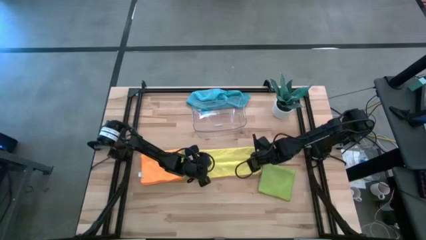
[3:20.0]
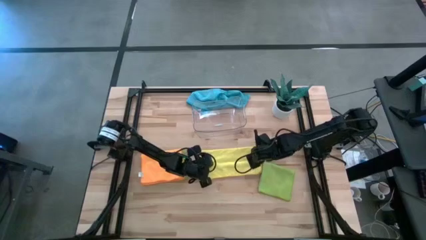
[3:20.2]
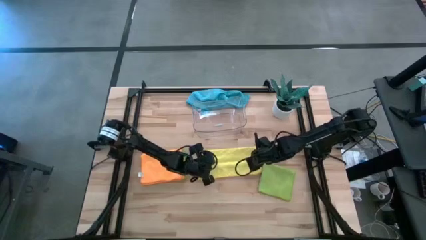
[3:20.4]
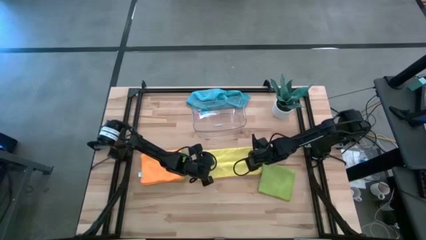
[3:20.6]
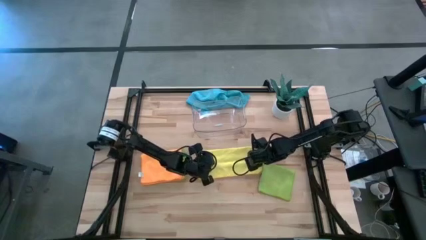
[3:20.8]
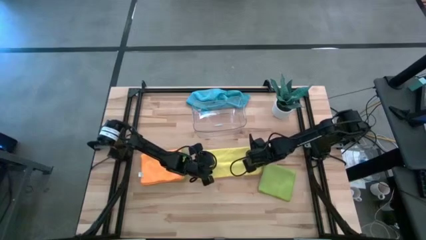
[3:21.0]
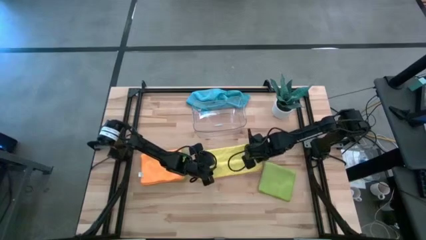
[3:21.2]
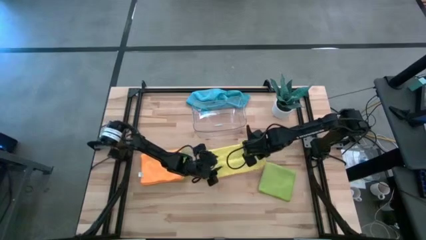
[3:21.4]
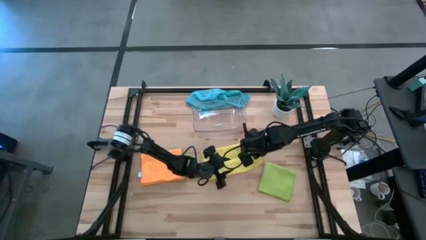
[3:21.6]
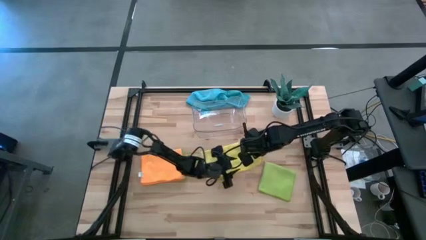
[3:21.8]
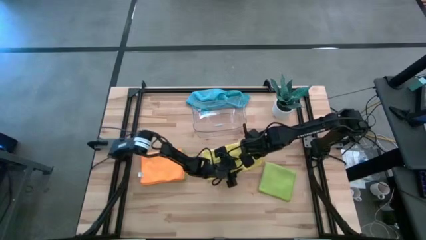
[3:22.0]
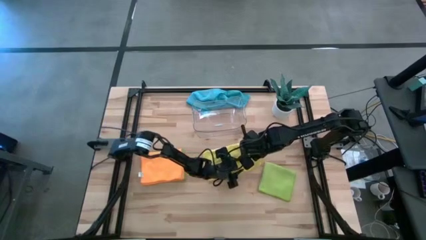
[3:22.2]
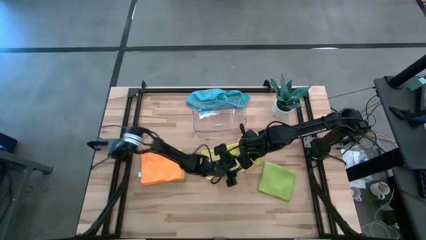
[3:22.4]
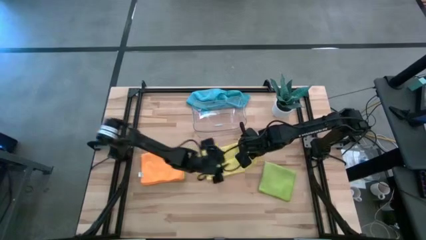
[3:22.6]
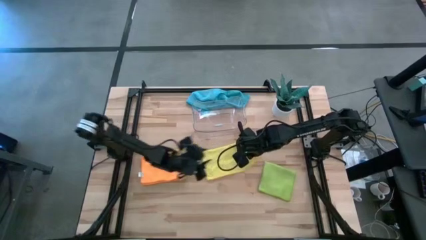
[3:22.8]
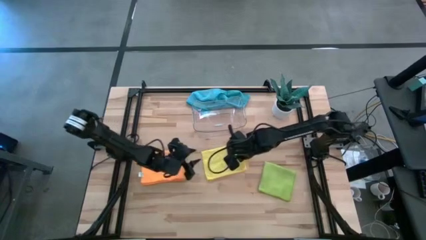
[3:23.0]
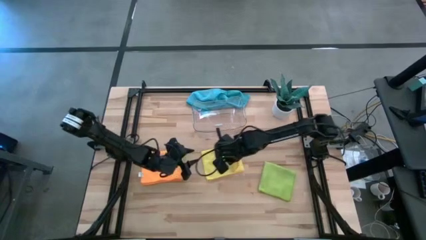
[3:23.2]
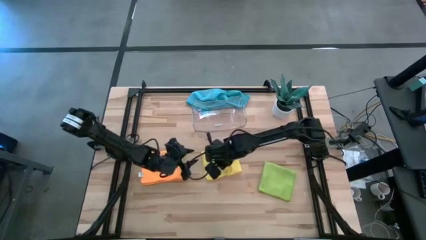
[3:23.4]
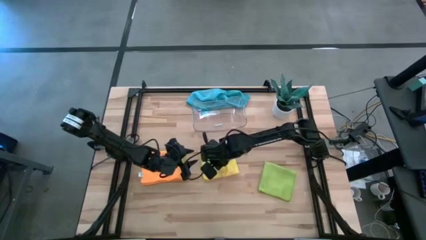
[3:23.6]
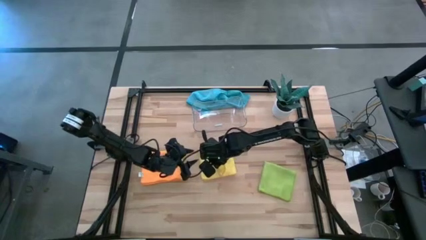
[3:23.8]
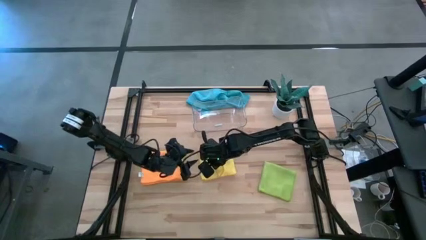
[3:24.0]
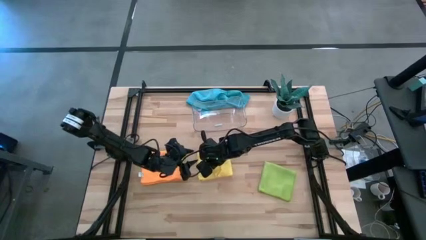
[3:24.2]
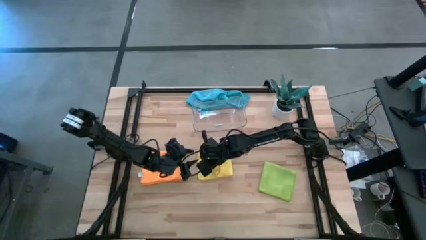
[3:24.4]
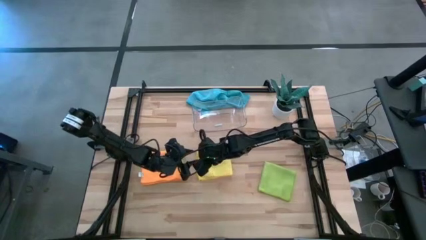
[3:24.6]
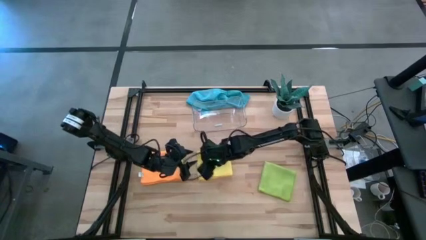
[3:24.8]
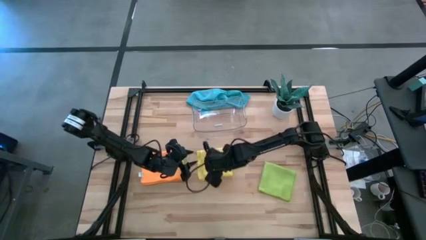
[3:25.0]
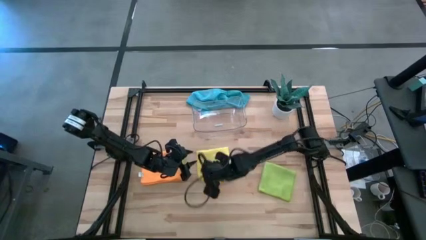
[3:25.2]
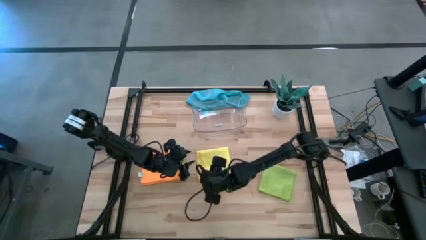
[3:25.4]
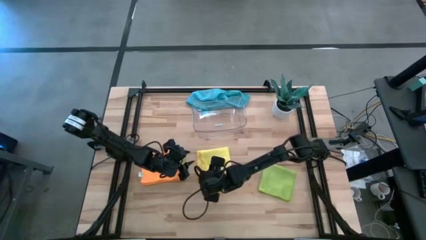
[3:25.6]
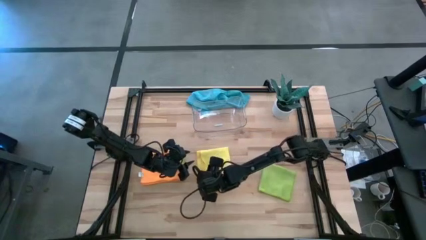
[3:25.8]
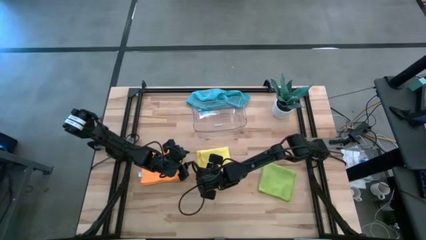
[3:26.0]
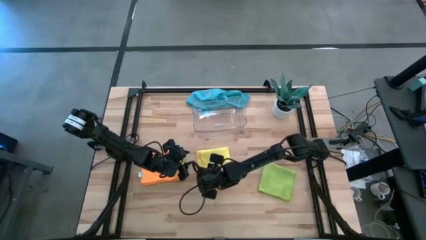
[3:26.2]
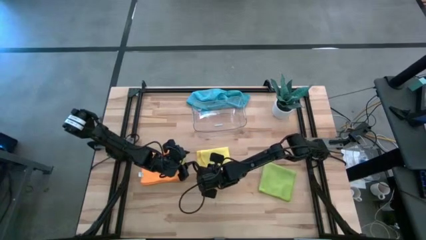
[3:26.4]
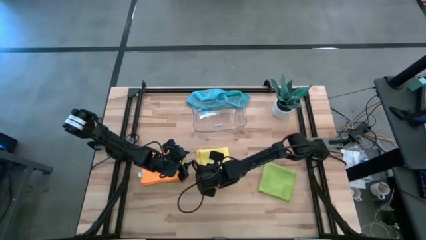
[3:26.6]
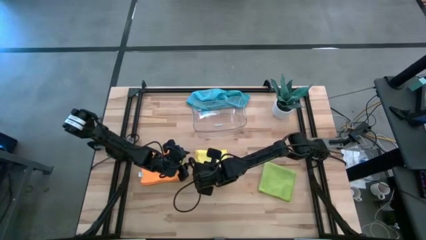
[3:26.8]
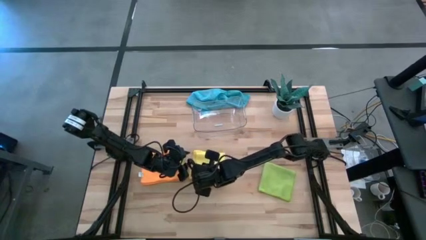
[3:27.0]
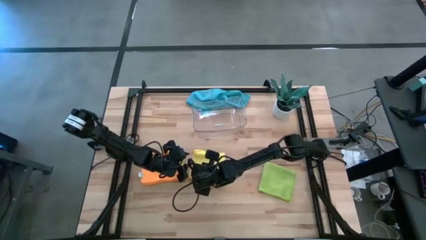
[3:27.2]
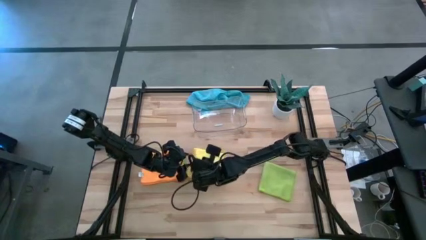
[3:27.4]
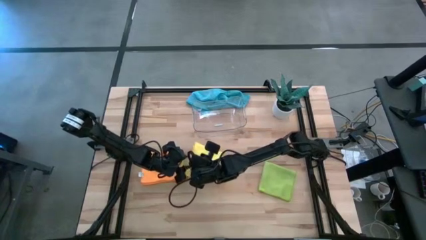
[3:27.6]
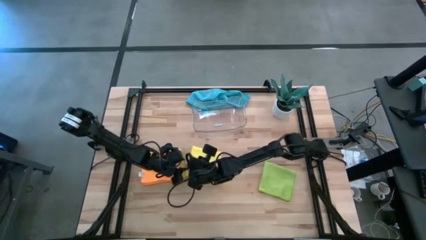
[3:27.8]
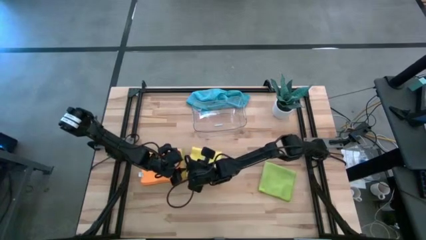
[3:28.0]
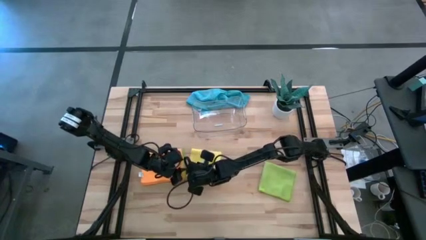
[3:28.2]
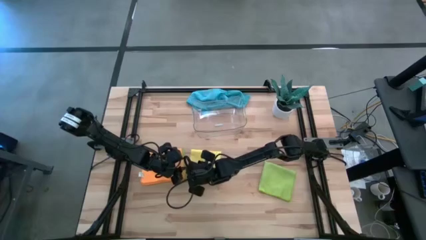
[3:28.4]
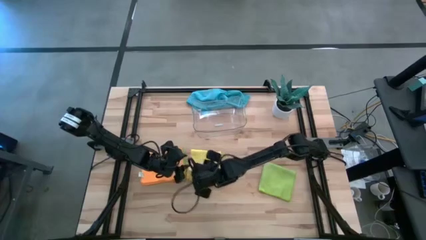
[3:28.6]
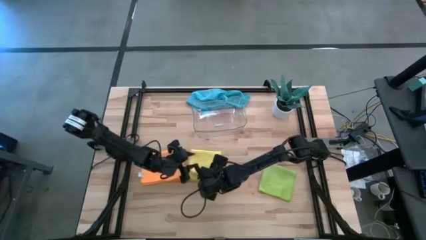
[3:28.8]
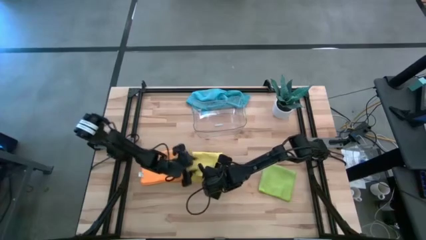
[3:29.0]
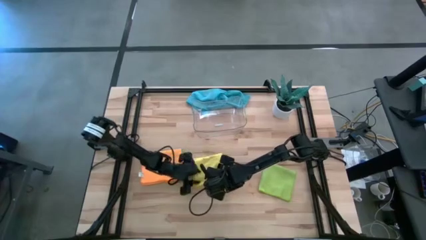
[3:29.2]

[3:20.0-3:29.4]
Task: Fold microfiber towels
Fold the yellow microfiber cloth

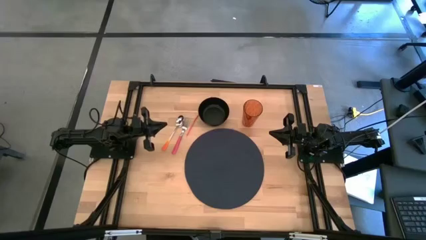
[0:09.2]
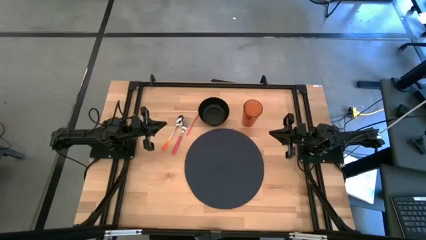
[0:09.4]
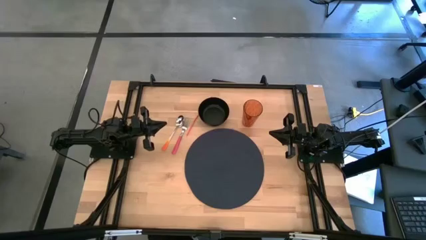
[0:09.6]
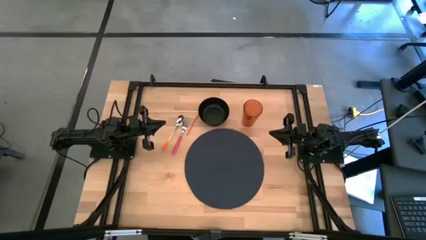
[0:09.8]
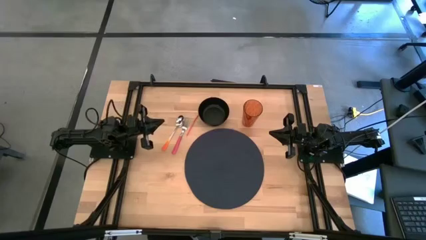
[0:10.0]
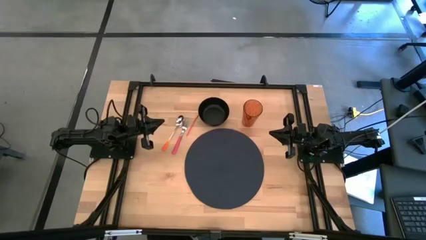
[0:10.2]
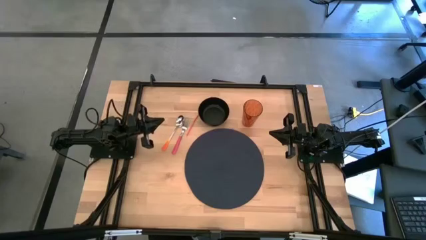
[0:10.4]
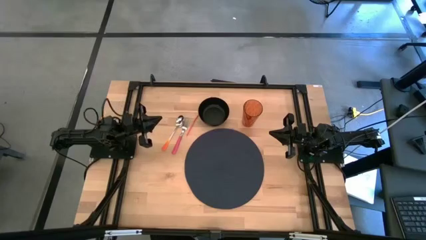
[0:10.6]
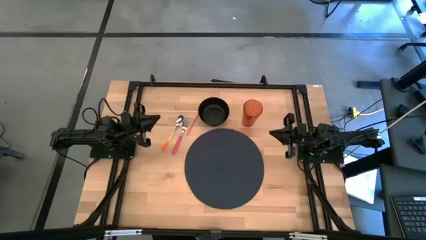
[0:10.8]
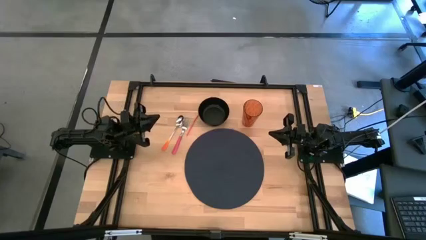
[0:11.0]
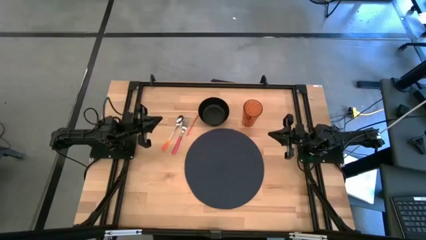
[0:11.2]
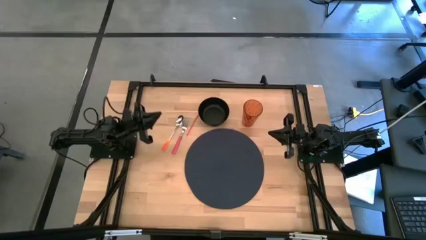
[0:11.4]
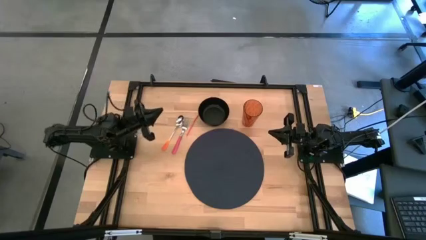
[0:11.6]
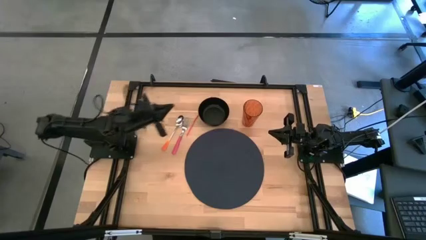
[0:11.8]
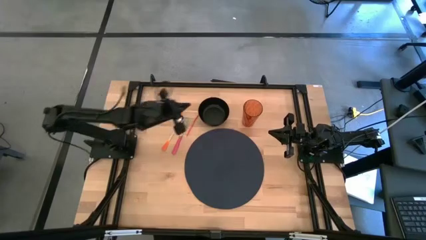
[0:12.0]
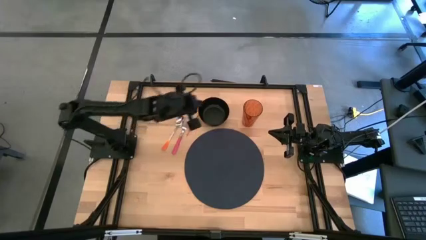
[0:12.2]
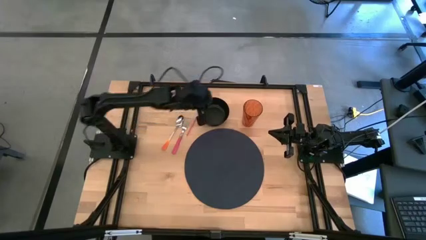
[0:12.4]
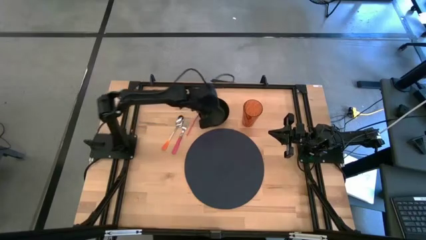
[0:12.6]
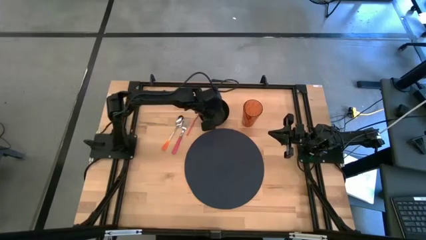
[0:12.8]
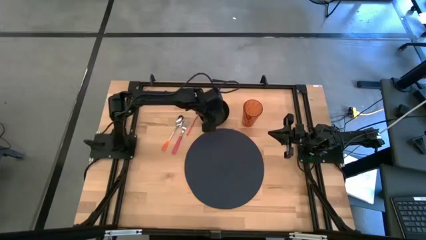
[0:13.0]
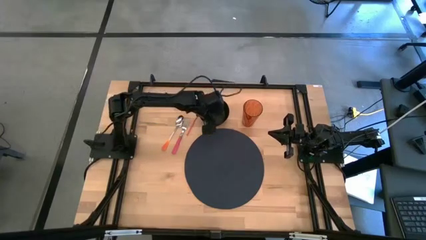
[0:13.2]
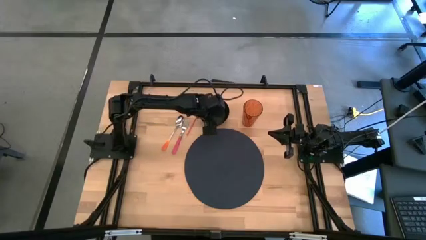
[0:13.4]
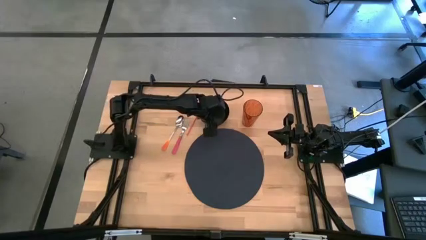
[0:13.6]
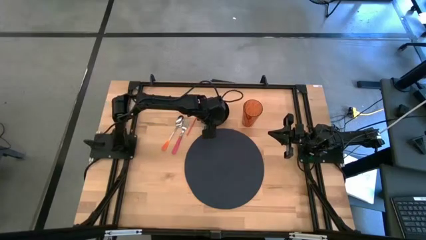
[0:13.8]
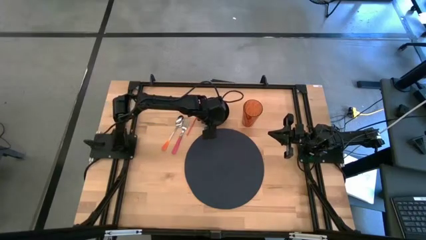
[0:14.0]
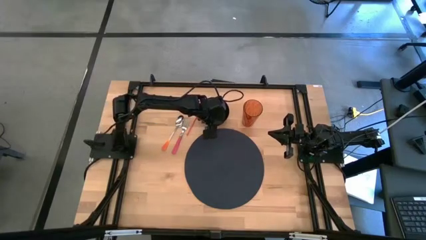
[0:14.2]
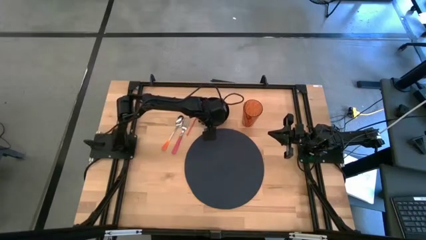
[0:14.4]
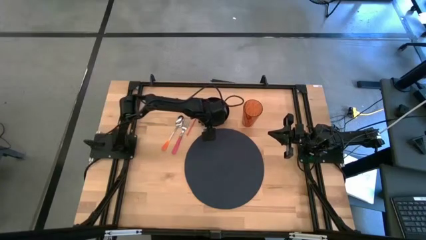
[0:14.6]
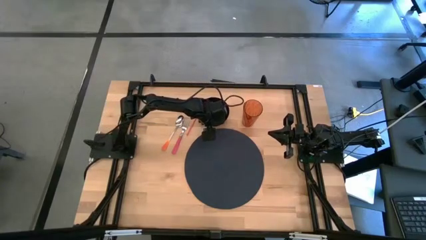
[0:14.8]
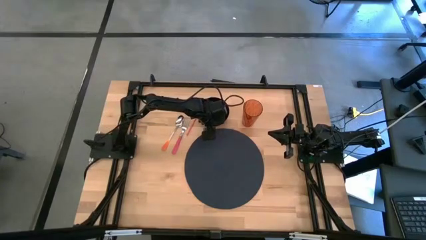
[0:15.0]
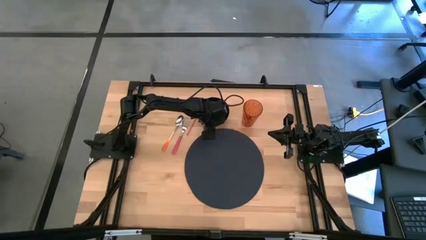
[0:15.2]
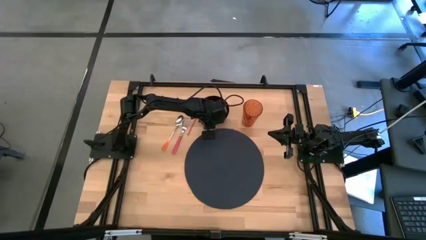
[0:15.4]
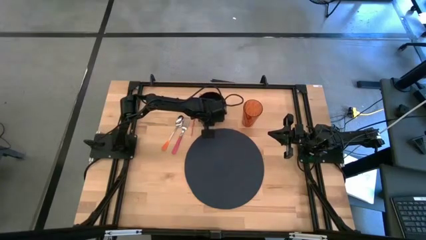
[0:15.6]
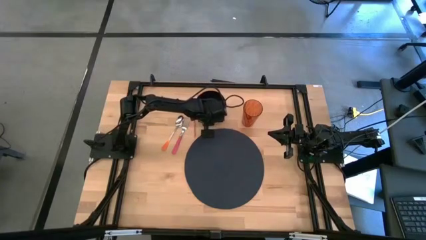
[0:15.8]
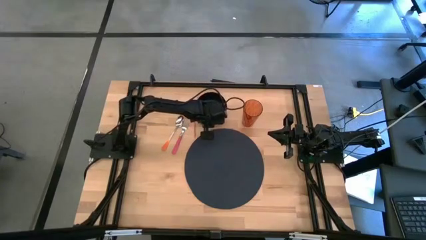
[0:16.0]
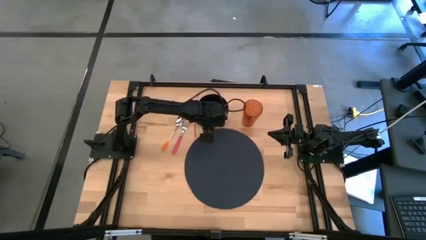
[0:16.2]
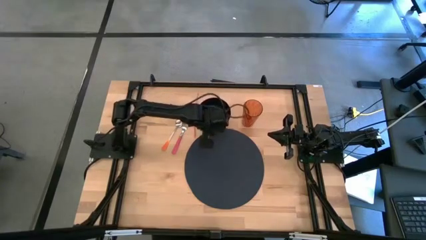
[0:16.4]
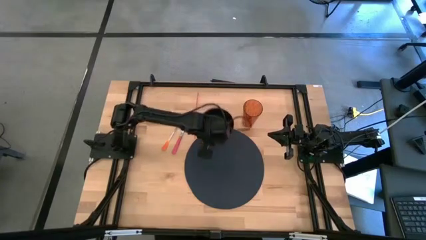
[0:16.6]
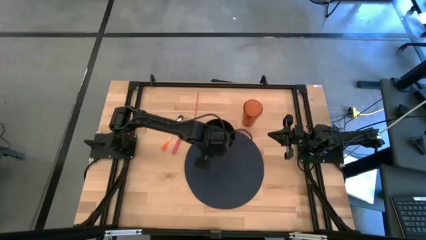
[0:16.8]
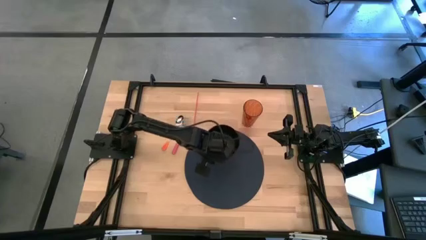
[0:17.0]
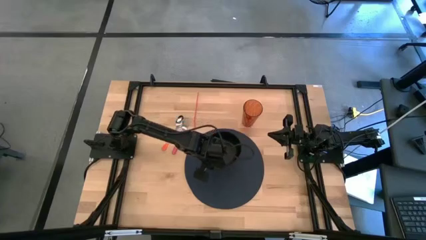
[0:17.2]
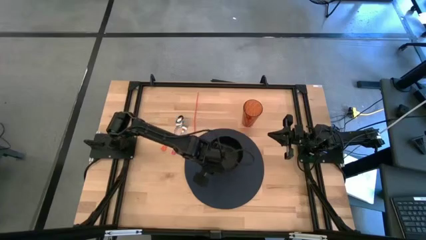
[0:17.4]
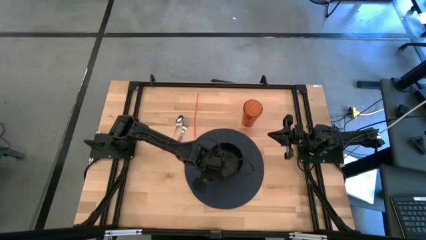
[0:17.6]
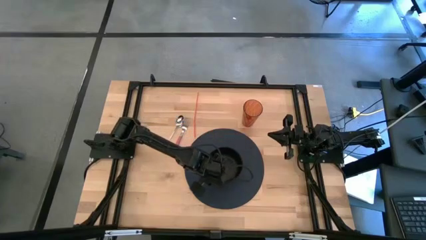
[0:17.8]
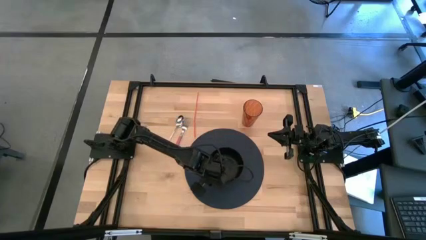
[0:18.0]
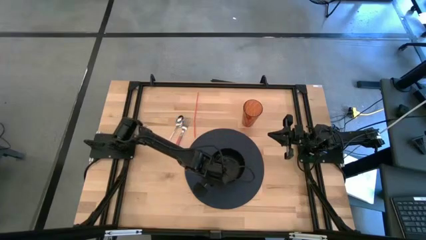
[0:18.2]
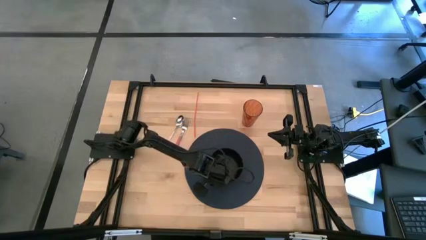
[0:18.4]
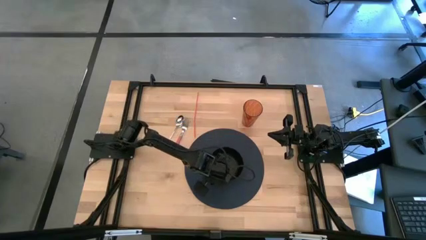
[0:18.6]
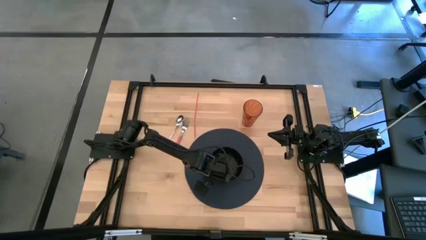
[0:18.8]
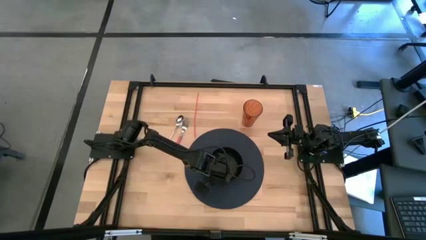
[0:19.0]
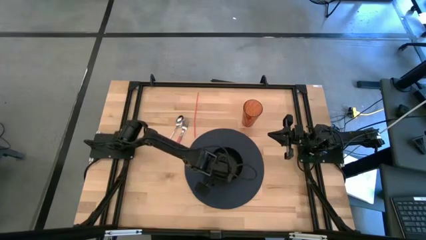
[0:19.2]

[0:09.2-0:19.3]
Task: Pick & Place Utensil
Put the black bowl on the blue mat
